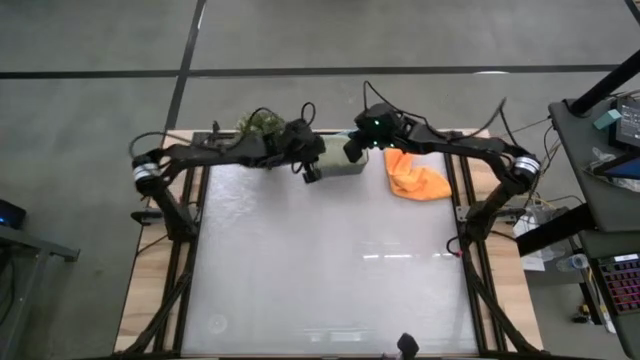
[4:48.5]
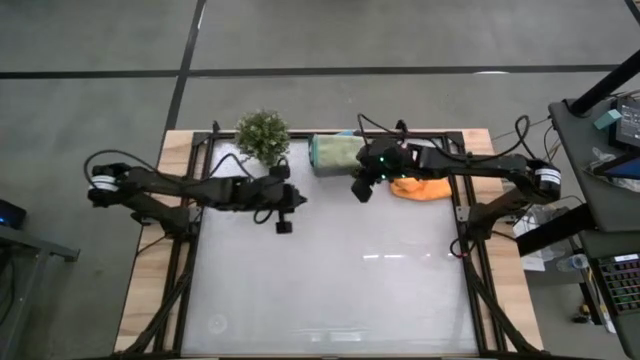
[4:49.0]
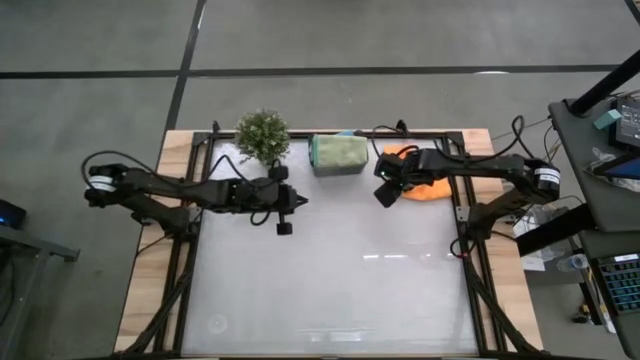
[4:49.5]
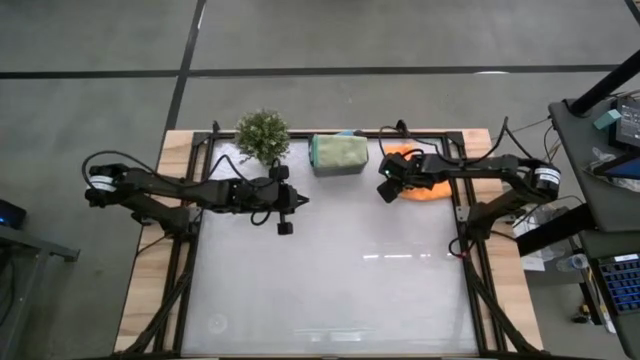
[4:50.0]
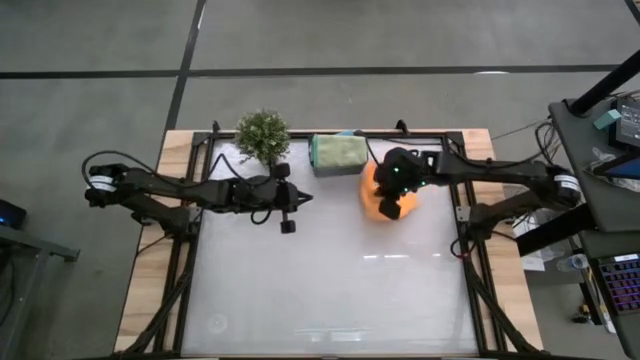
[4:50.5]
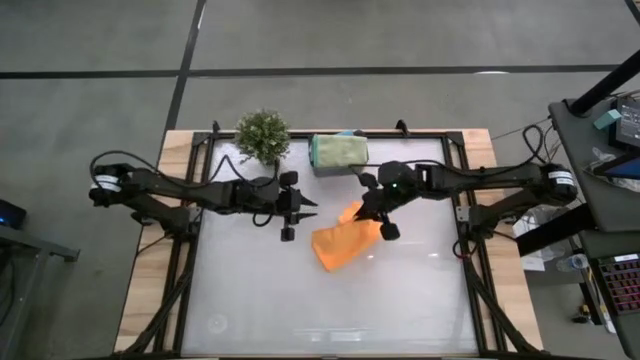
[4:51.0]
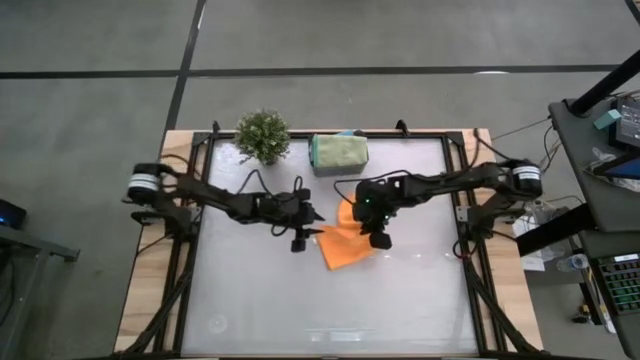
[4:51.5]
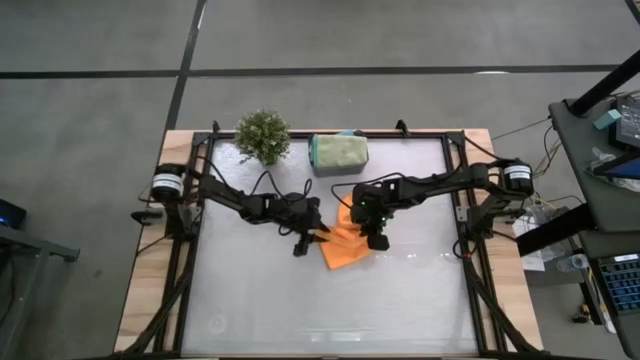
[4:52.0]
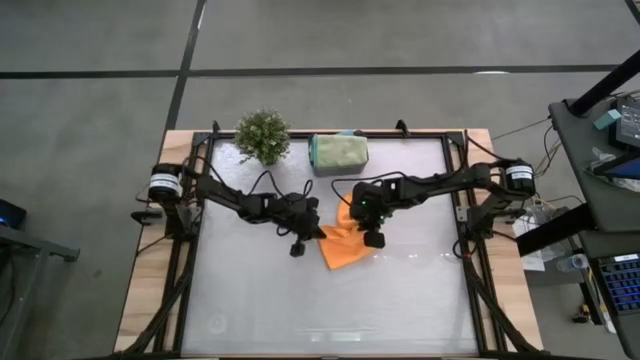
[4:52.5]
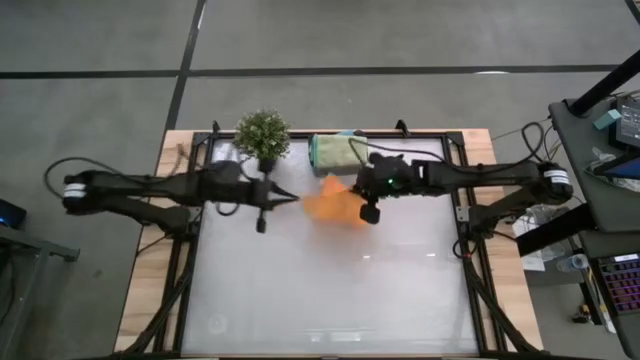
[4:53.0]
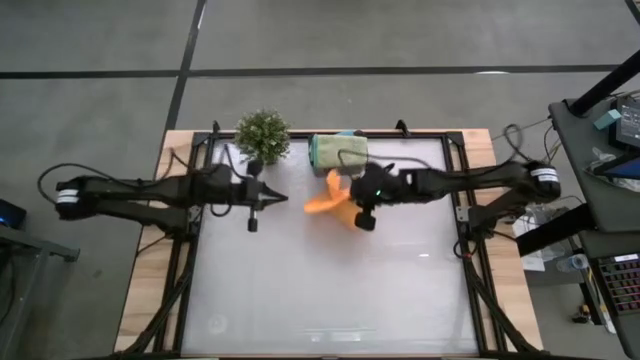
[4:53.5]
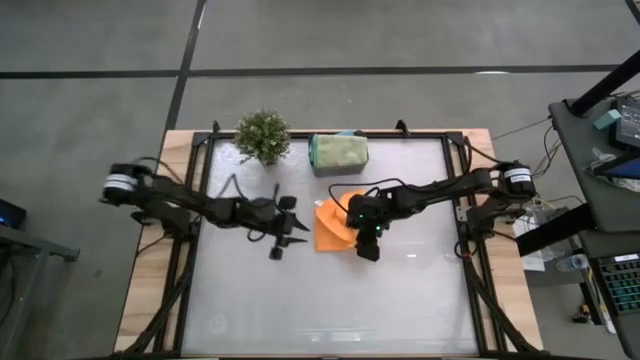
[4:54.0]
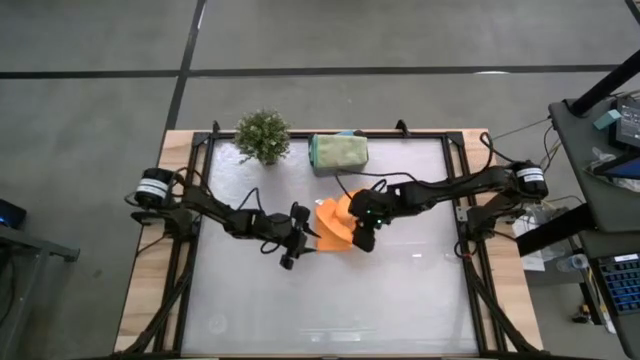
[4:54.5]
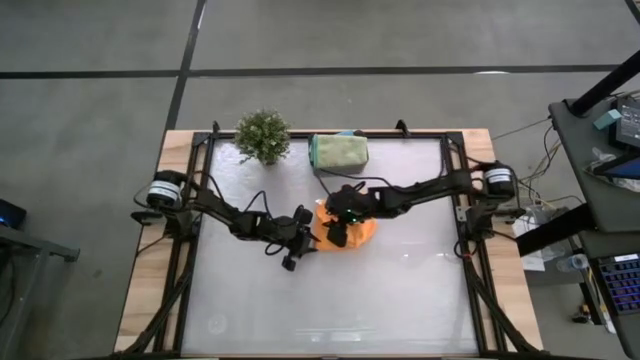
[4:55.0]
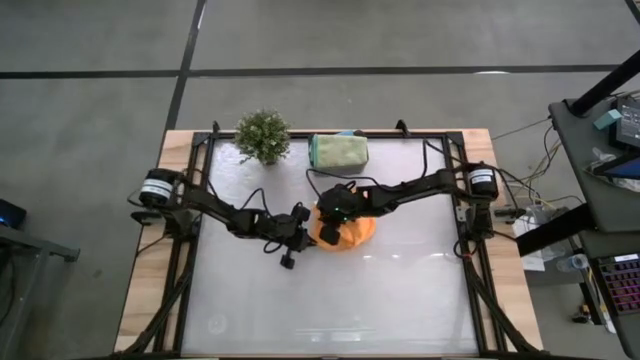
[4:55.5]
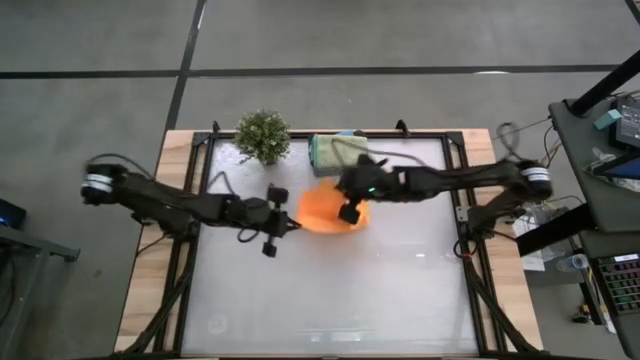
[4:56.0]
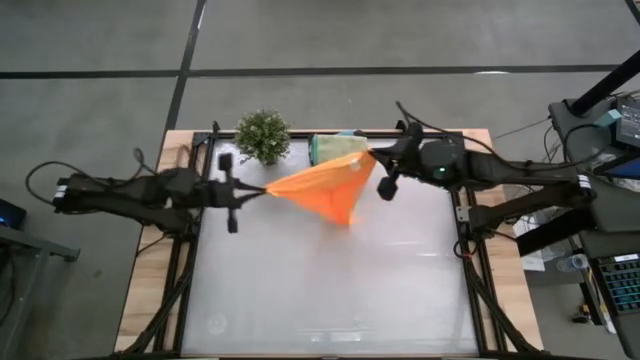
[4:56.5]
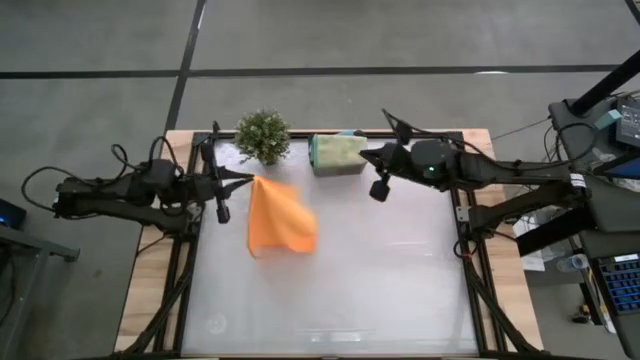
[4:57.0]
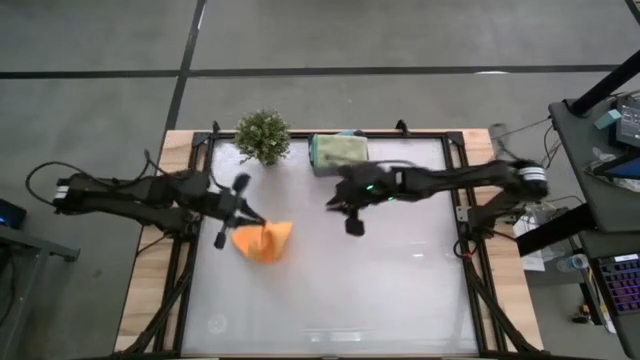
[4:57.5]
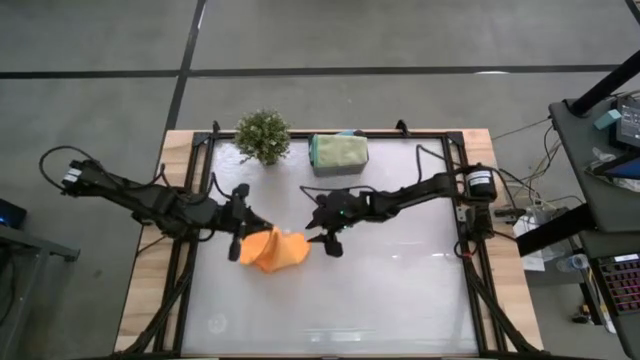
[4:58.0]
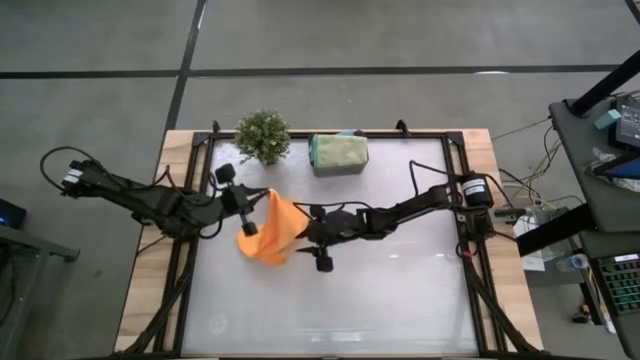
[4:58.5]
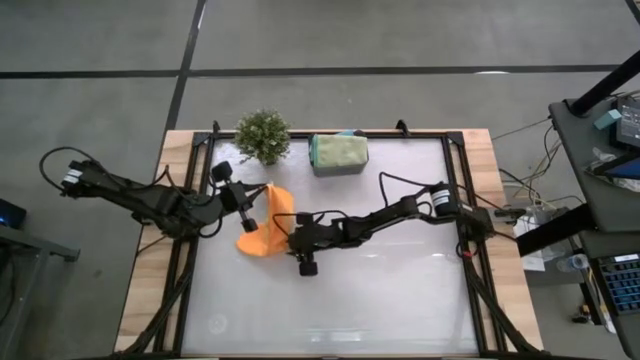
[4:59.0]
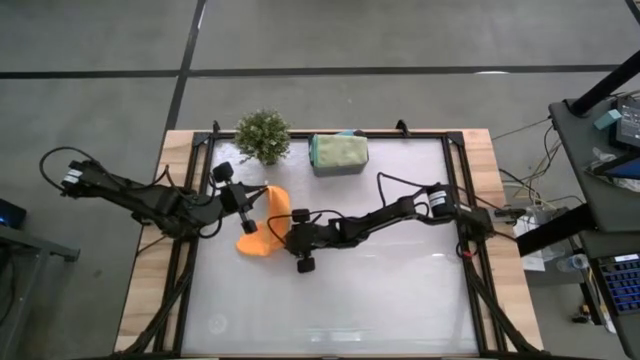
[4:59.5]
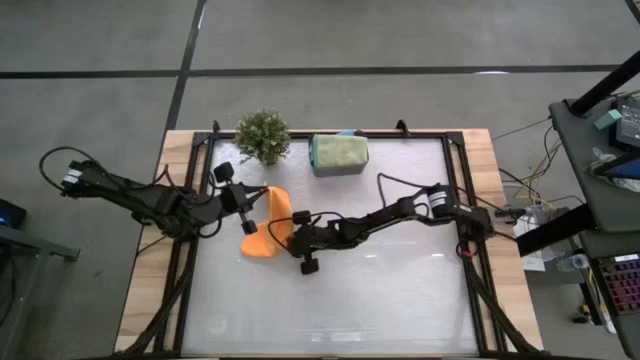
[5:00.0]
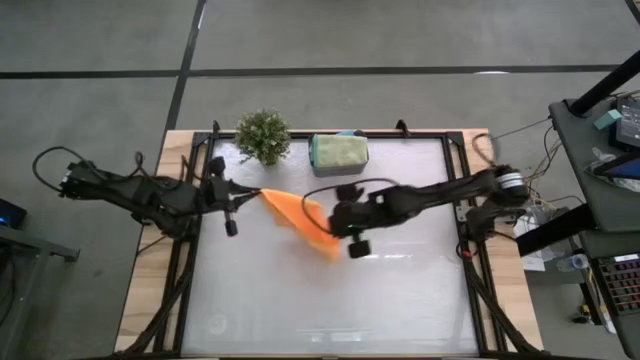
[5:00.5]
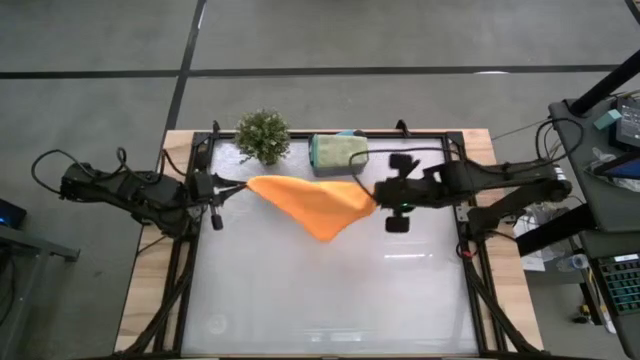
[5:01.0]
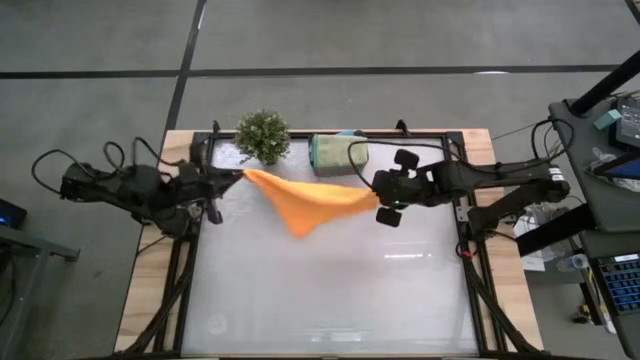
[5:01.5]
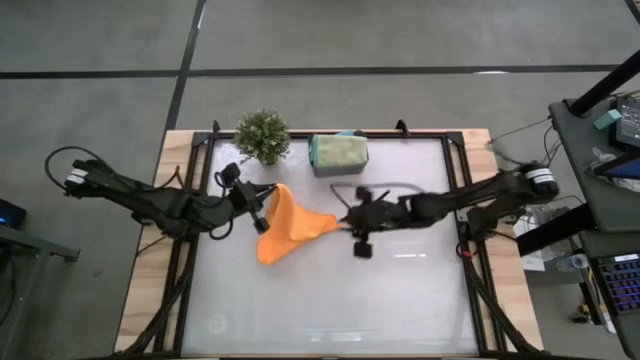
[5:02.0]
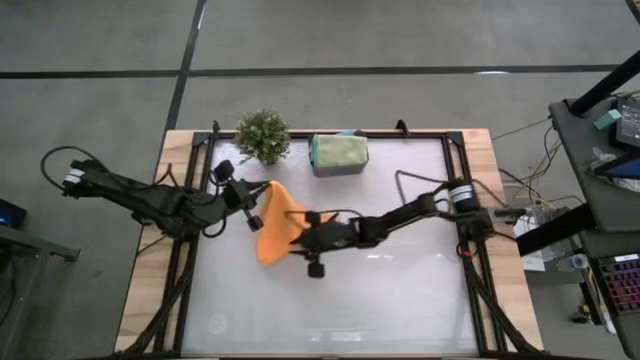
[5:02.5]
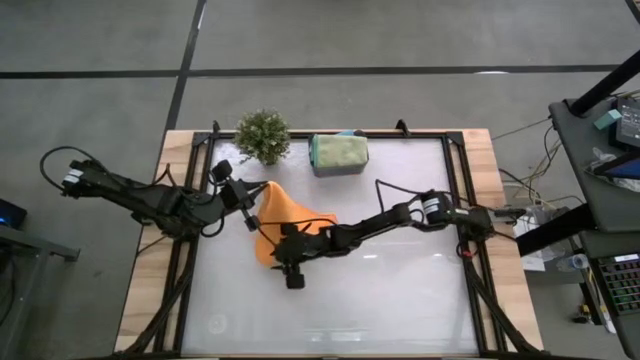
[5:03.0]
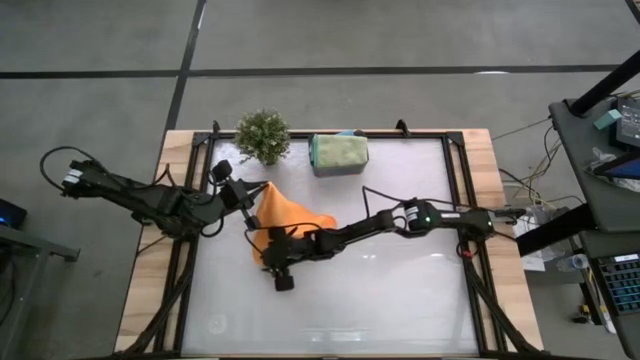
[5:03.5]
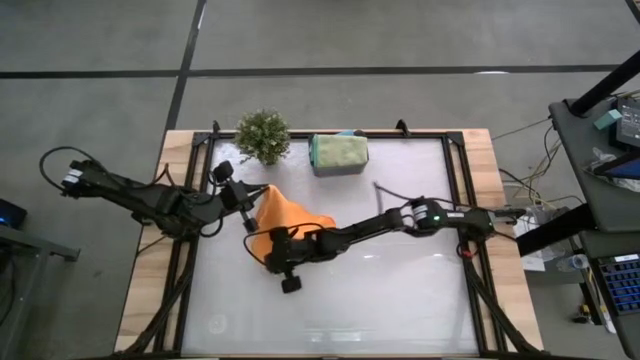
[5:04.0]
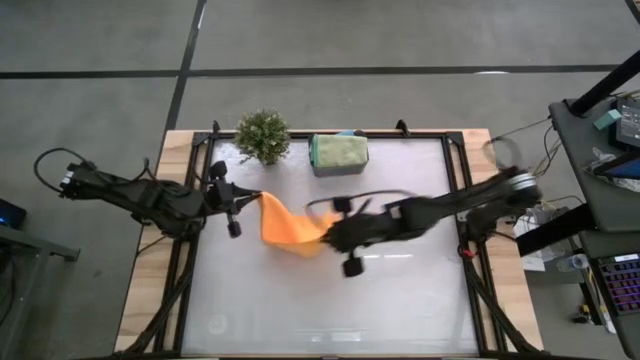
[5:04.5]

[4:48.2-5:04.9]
Task: Fold microfiber towels
Fold the orange towel

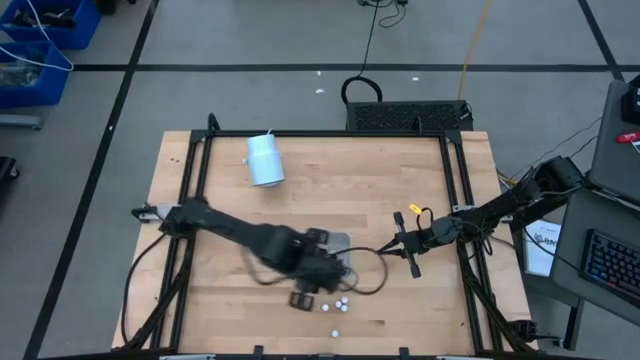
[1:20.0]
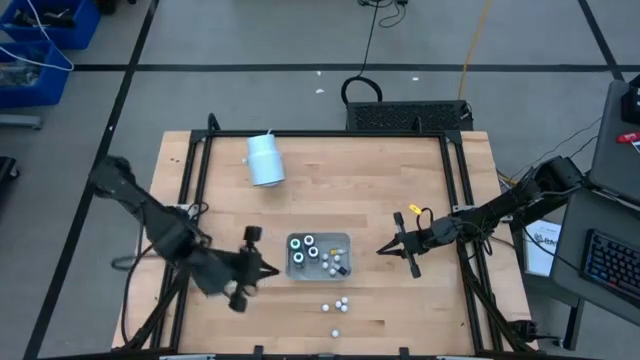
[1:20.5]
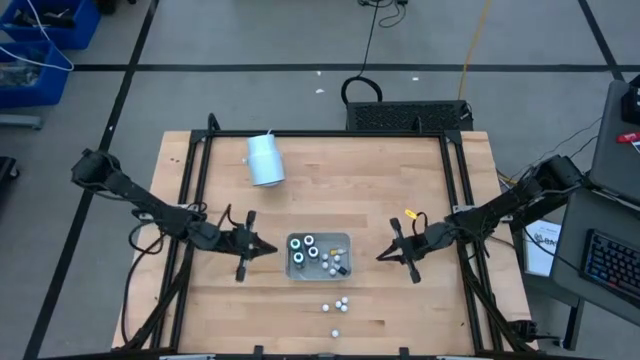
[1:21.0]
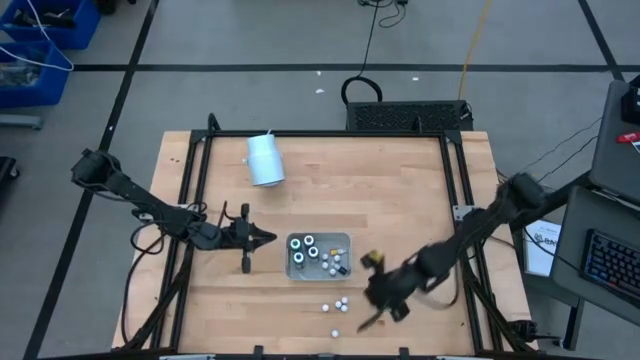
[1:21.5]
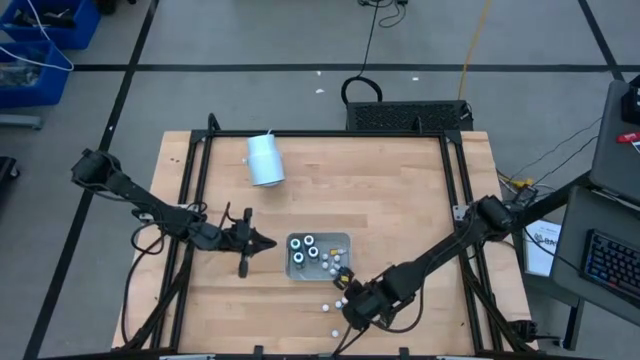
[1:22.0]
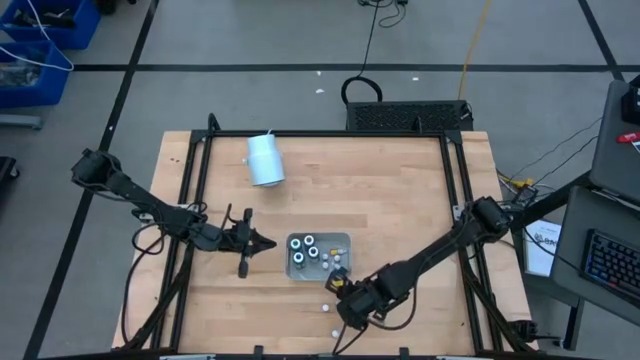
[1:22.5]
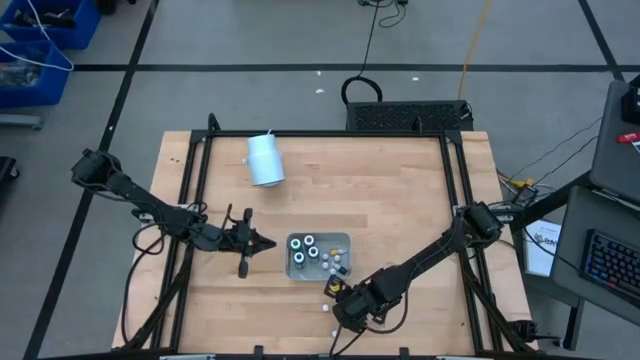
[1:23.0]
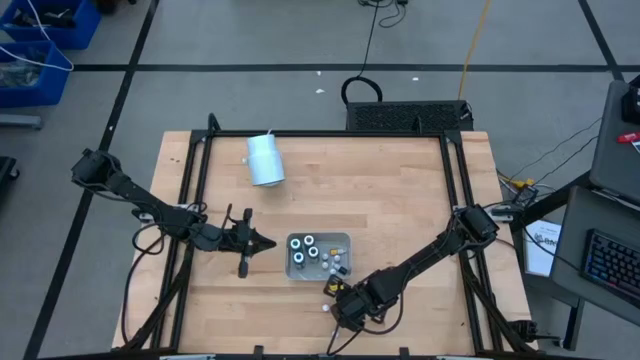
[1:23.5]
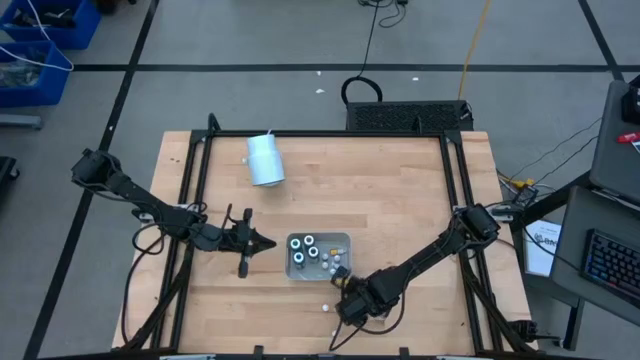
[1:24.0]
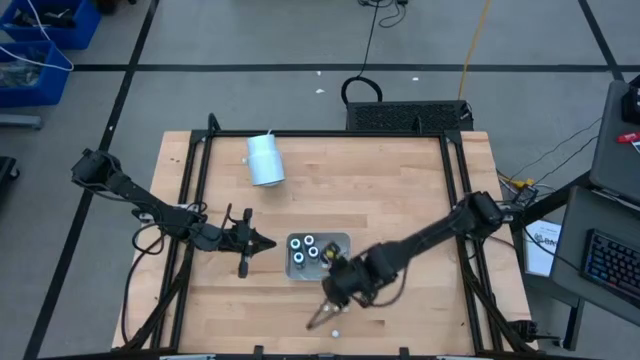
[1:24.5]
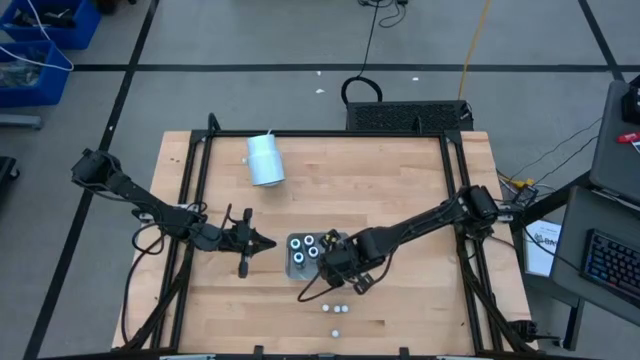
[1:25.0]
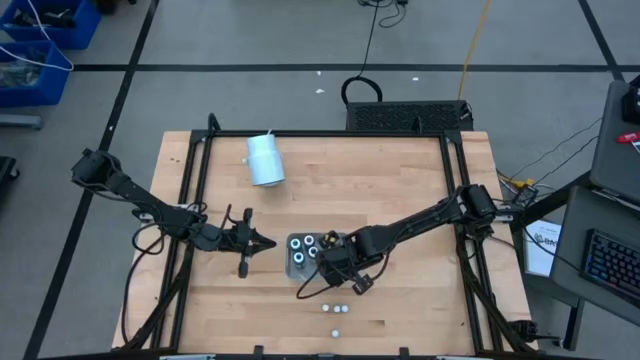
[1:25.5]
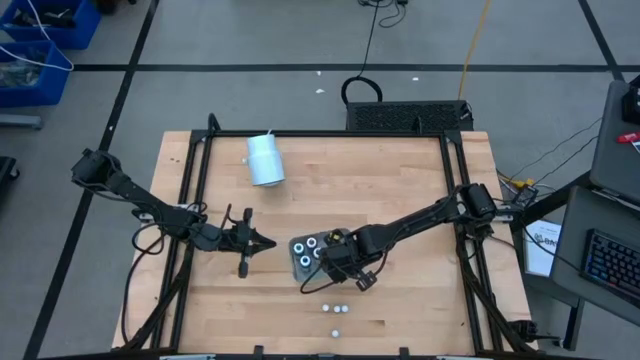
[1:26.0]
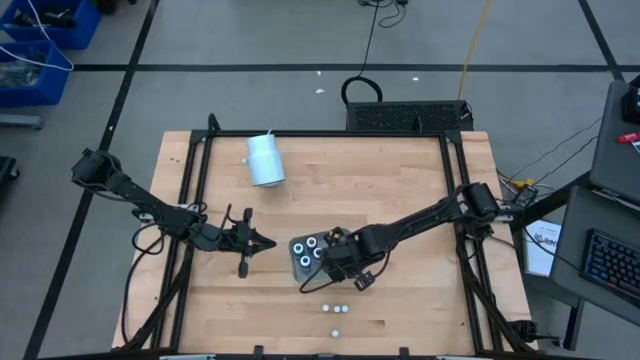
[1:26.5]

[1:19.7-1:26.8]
Task: Pick & Place food coloring
Put the small orange food coloring bottle into the gray bin
